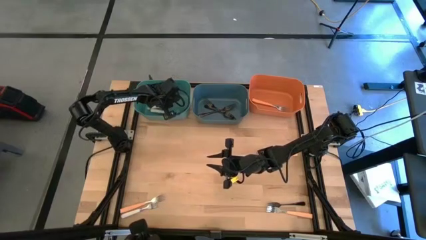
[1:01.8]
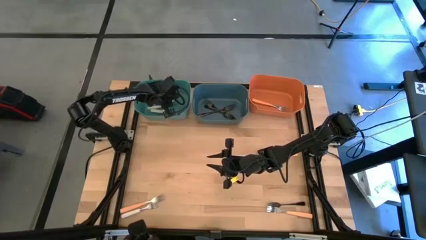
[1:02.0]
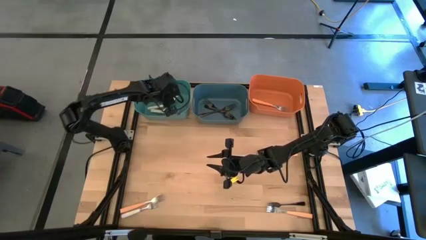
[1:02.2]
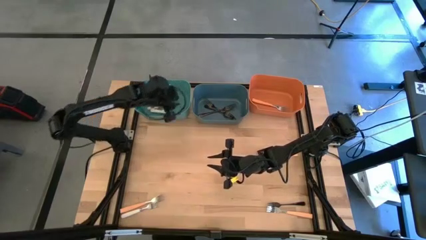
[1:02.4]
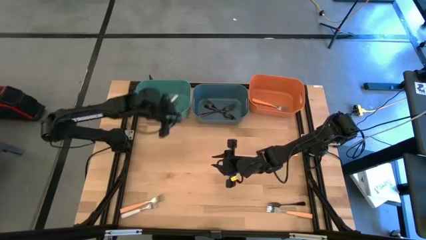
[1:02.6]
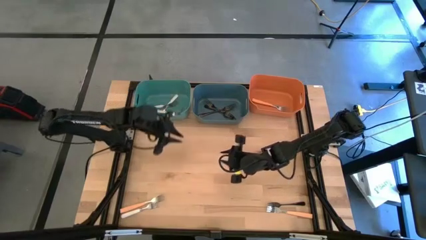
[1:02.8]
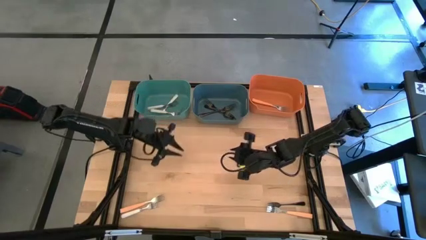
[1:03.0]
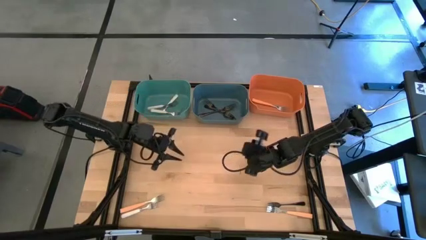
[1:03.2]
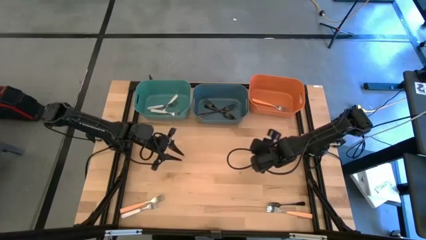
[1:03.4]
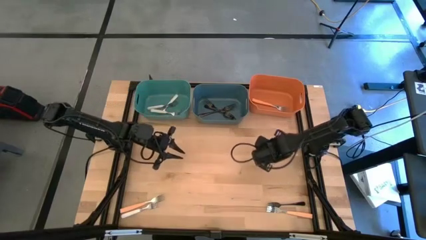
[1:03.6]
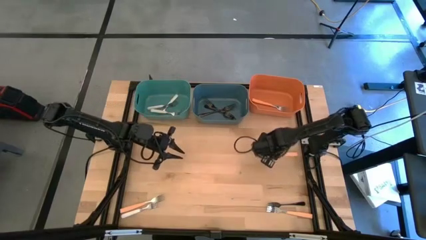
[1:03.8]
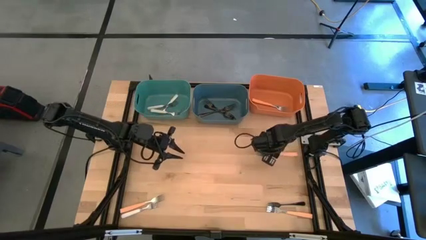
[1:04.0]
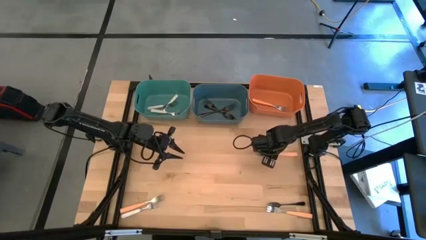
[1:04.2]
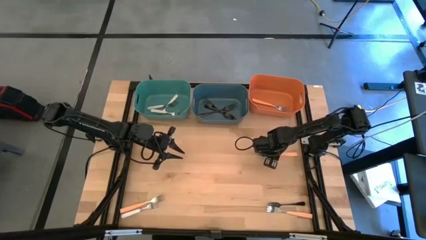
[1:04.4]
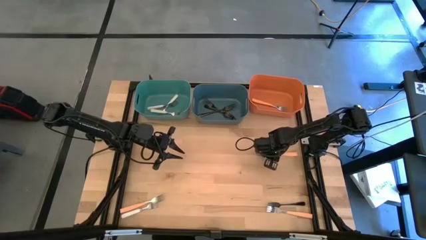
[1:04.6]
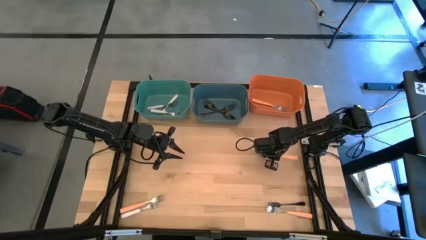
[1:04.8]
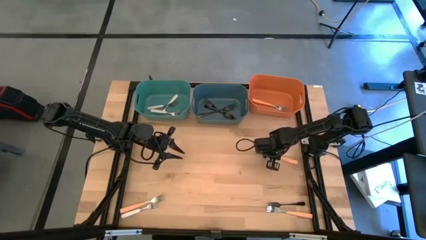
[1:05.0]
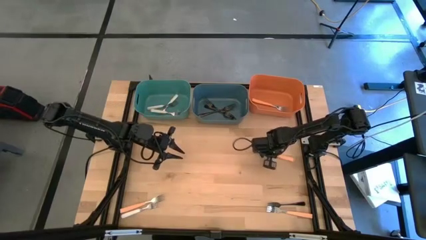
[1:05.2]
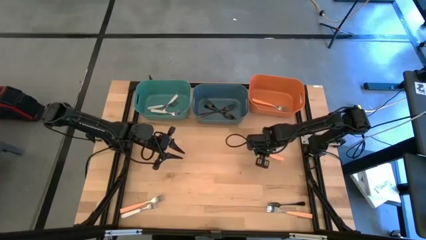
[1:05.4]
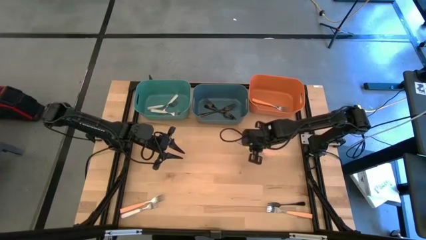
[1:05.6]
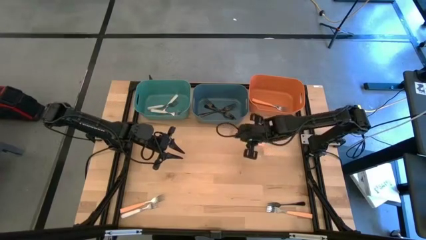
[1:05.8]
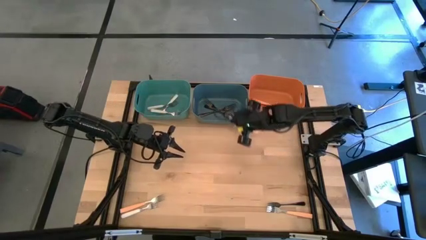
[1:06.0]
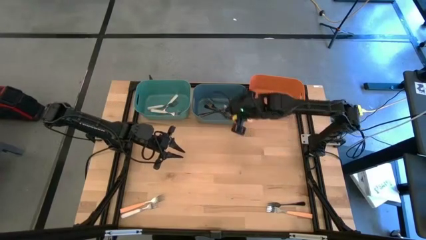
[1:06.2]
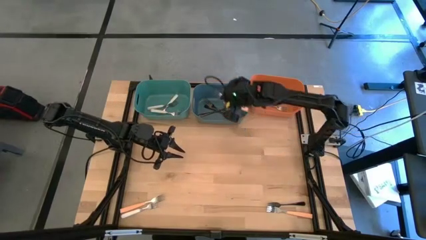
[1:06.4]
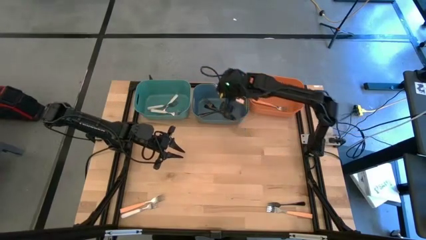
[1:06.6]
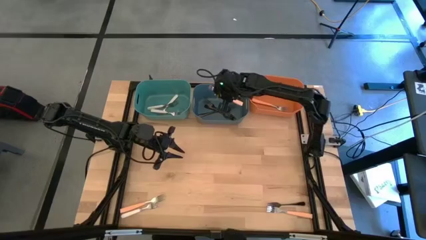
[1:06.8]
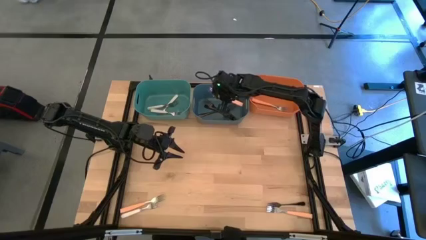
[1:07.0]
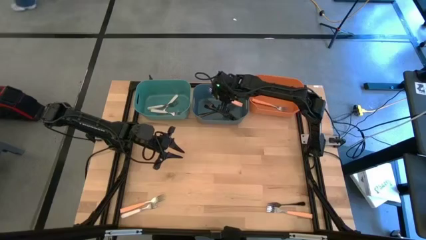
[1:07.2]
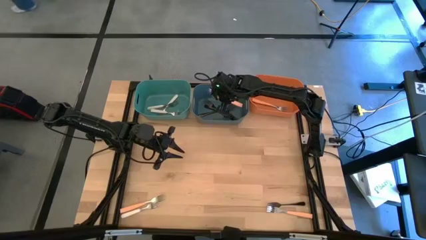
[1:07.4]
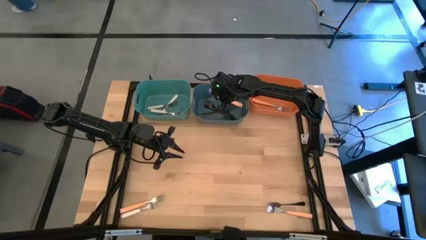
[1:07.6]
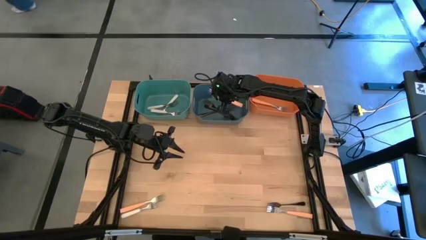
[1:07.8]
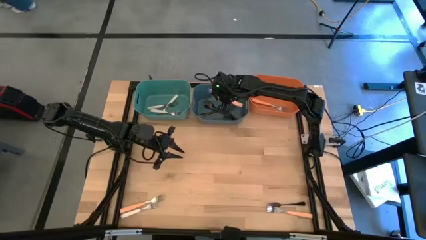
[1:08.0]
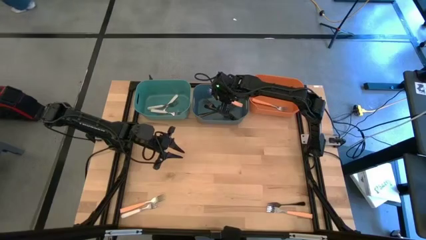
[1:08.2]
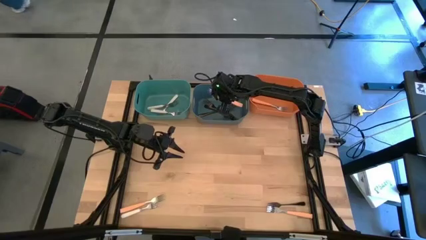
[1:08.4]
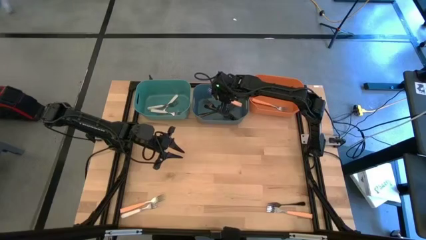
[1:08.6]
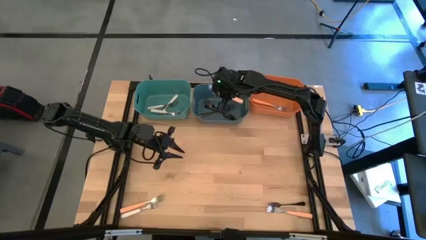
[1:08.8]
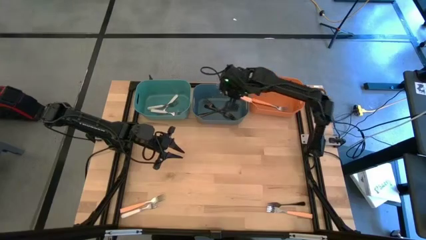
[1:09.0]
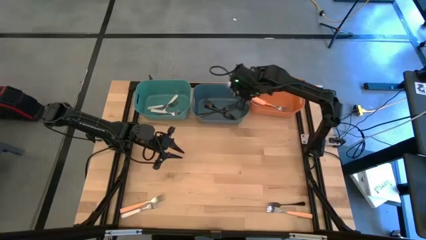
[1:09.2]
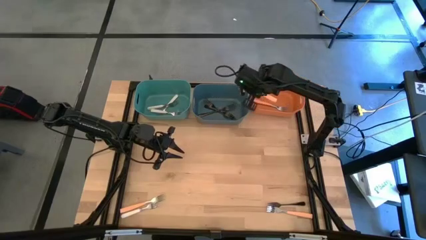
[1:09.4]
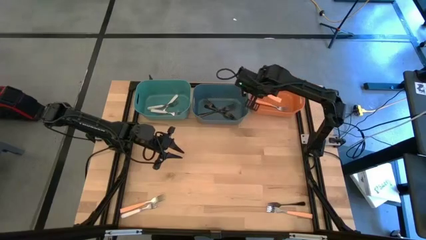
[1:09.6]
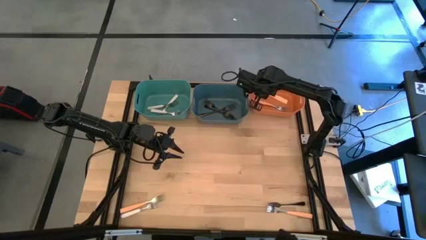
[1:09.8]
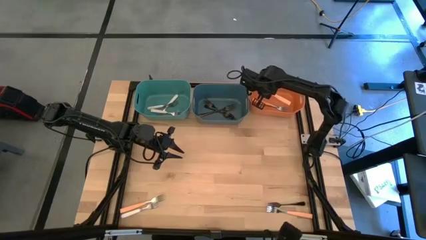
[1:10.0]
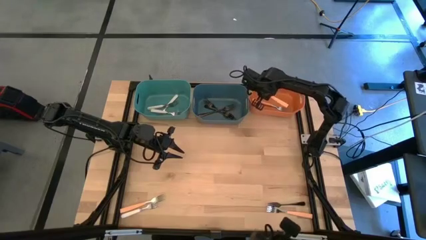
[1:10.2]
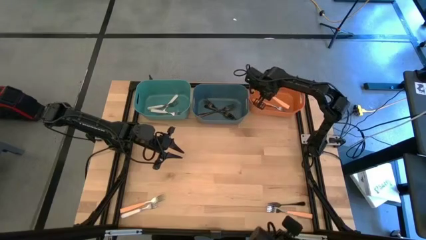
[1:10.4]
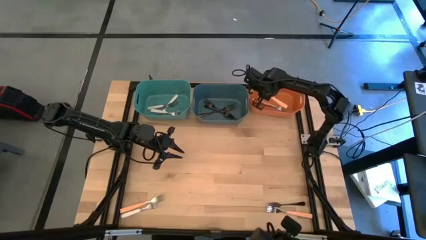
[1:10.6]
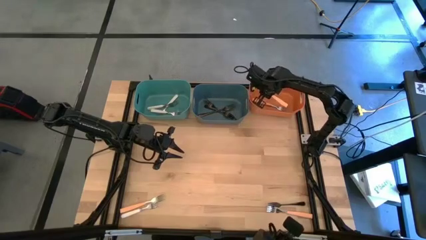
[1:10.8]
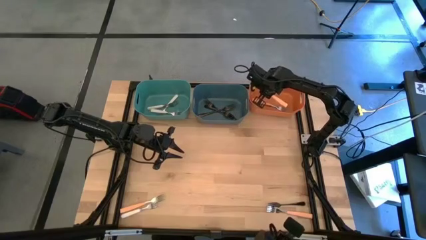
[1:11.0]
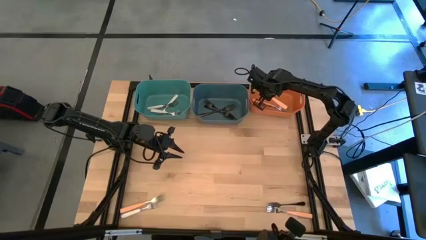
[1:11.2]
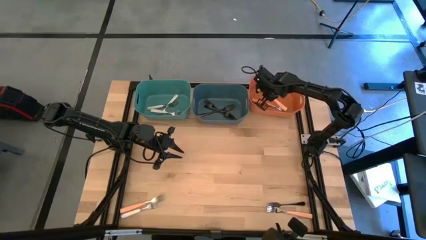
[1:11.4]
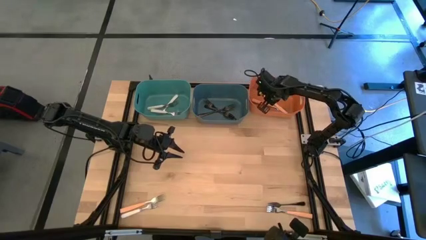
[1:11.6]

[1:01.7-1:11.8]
Task: Sort silverware by color (type)
Put the top right orange fork into the orange bin

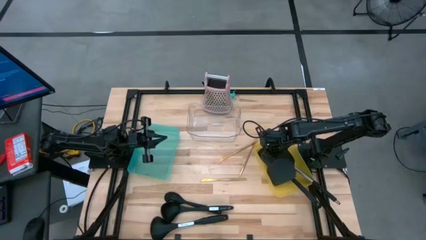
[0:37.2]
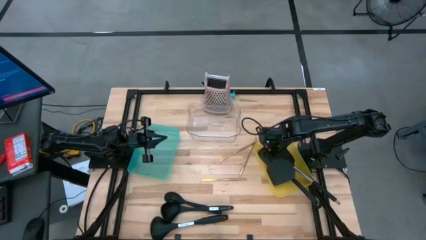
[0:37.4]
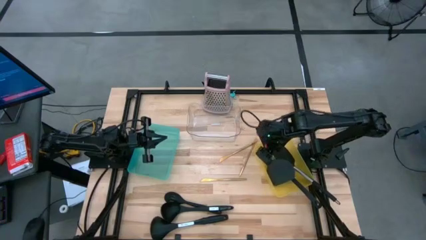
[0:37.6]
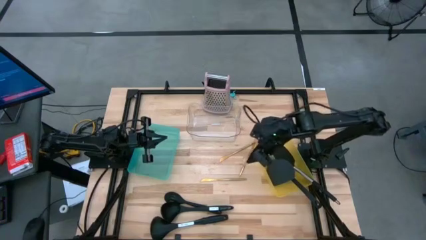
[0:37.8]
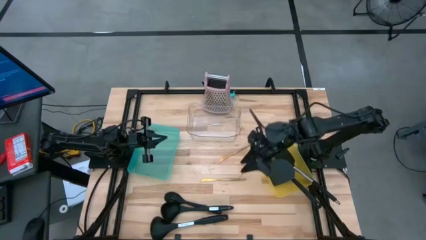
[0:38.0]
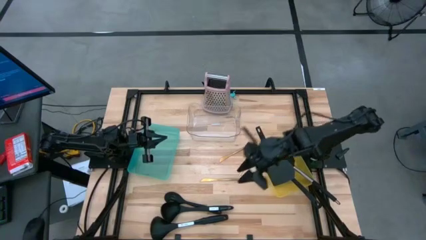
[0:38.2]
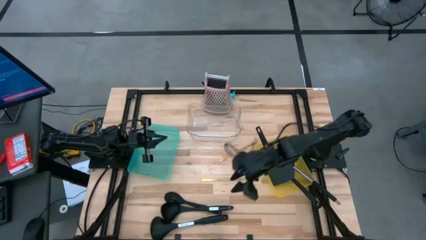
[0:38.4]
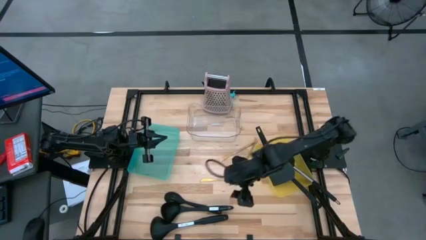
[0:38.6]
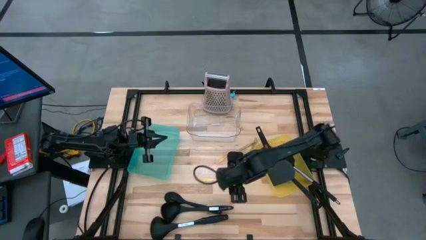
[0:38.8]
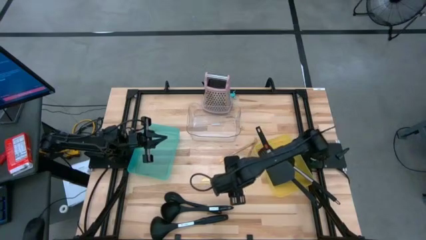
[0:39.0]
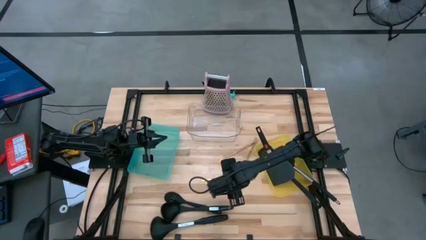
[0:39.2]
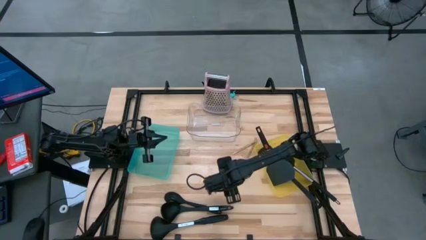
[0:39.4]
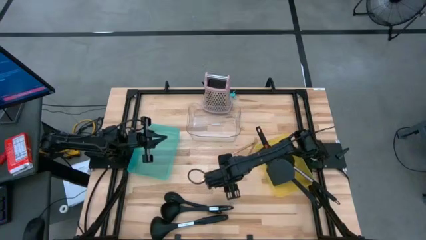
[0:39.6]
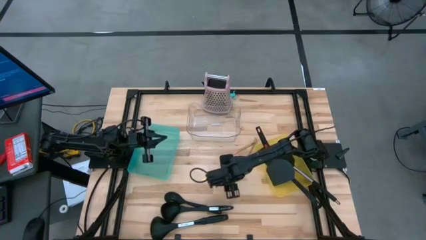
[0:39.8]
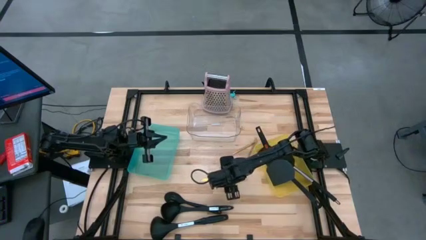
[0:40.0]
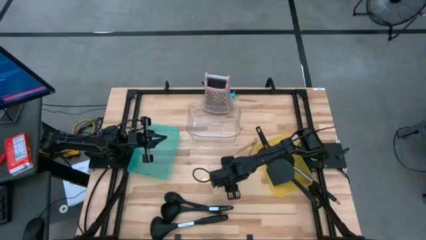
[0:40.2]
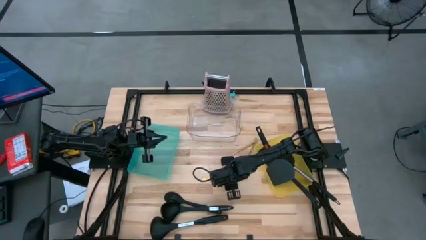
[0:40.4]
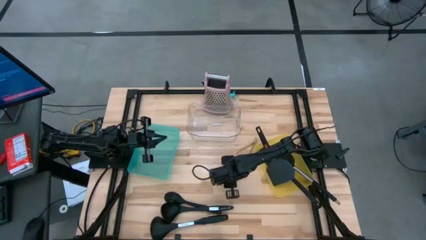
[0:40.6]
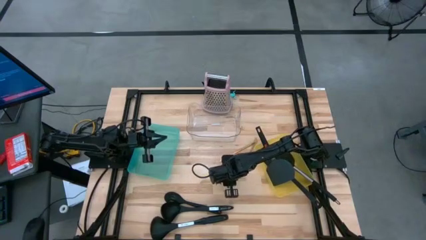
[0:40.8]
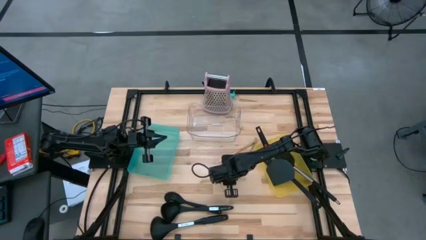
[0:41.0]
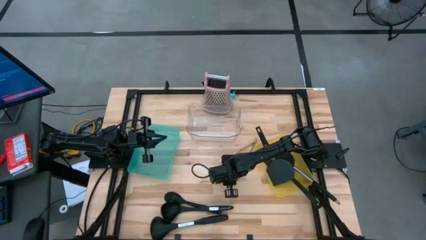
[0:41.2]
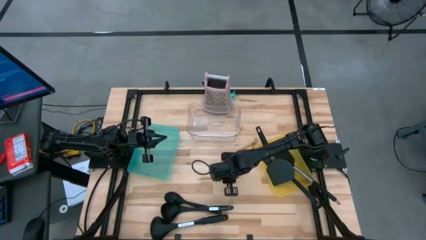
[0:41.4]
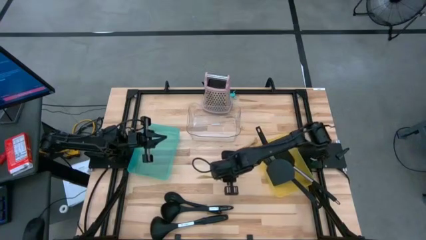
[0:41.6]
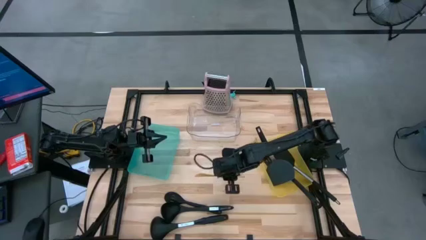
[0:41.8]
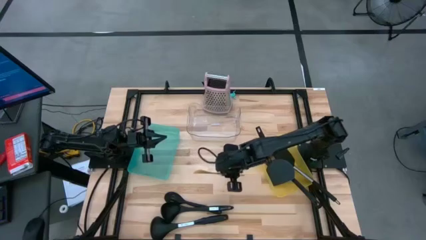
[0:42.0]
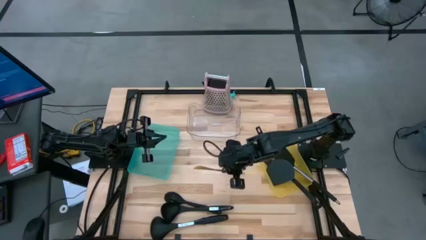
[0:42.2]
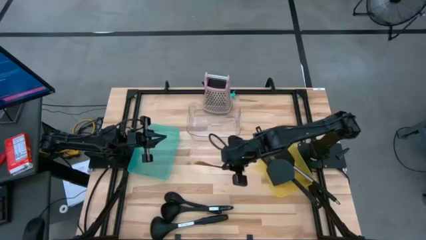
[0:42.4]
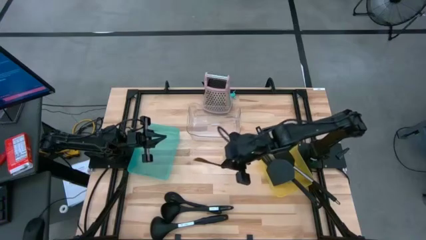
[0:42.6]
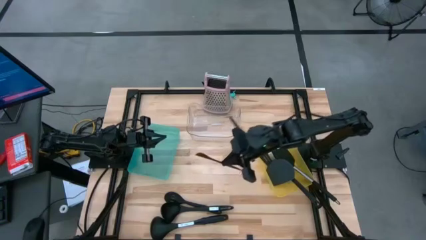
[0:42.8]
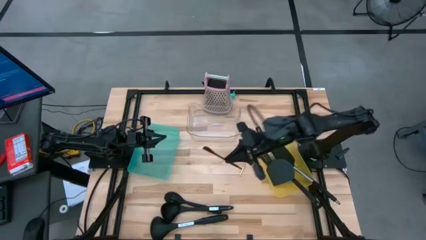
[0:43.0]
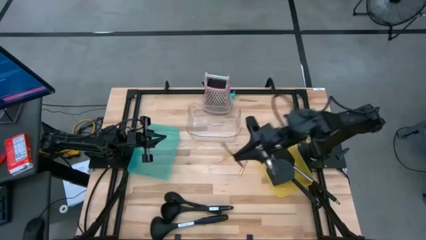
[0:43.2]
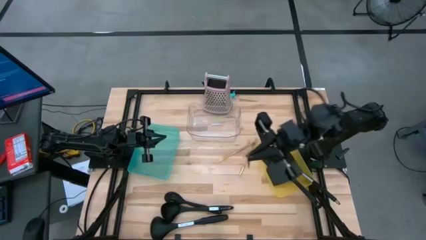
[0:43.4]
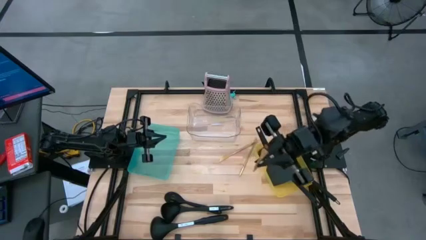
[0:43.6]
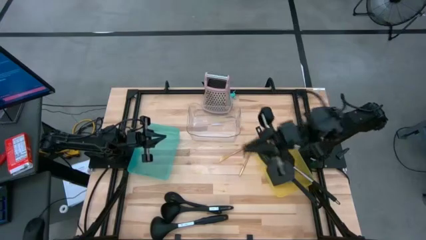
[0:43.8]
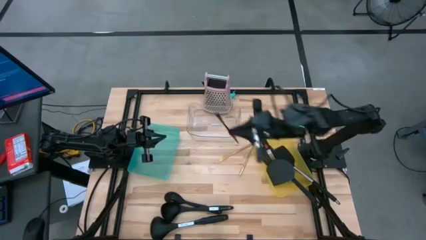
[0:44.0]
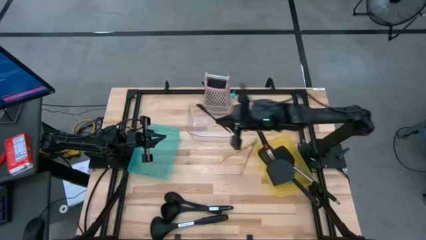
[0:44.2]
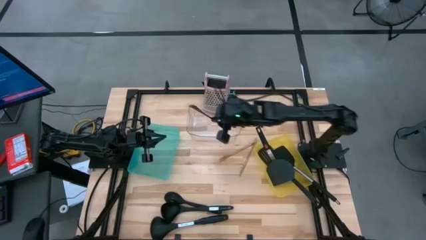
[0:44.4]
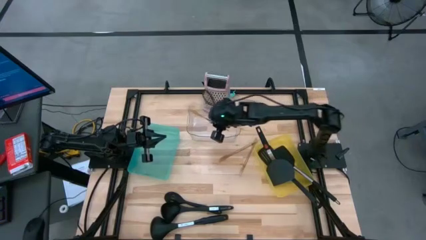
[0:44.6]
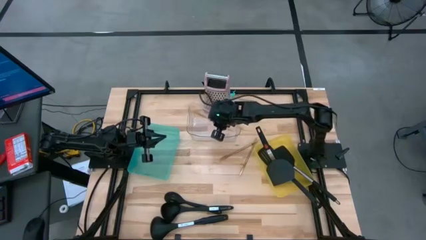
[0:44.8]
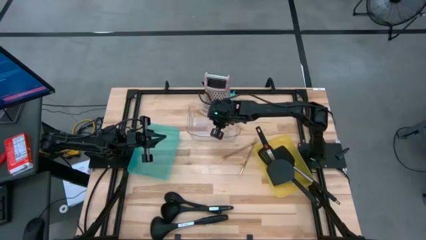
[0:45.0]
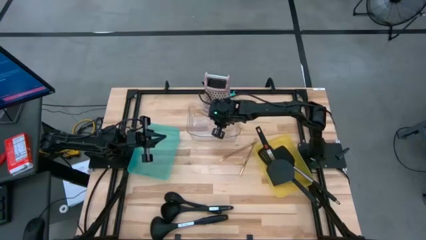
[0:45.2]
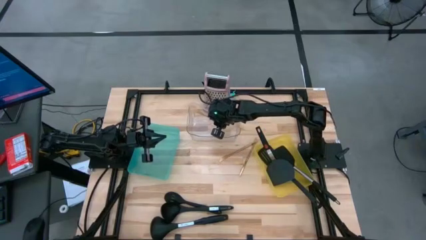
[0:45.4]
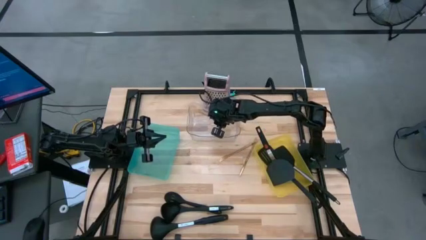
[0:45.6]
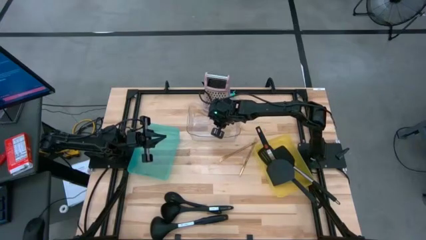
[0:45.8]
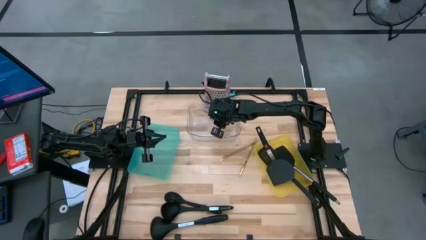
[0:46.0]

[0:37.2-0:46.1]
Task: Pick & Place Kitchen Items
Put the gold knife into the transparent bin
